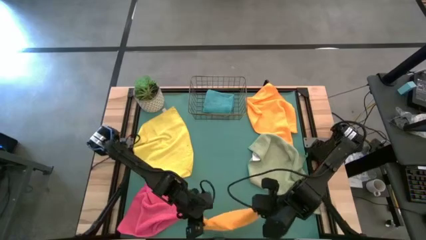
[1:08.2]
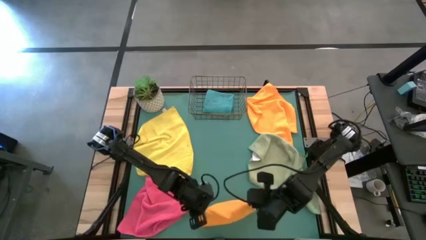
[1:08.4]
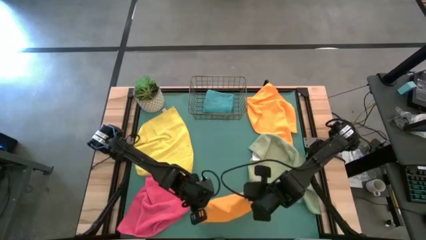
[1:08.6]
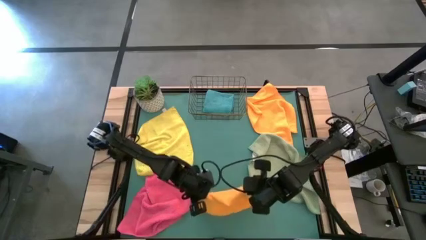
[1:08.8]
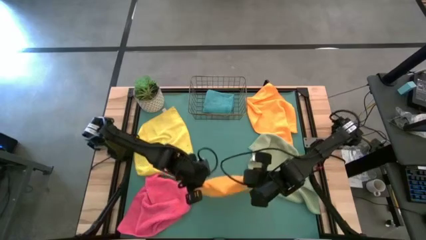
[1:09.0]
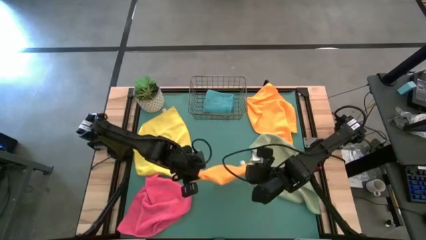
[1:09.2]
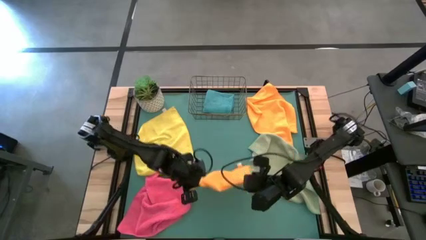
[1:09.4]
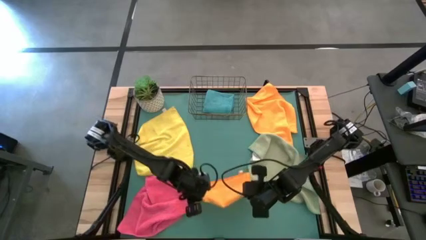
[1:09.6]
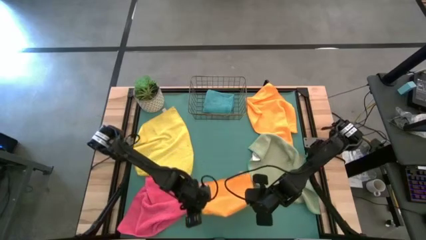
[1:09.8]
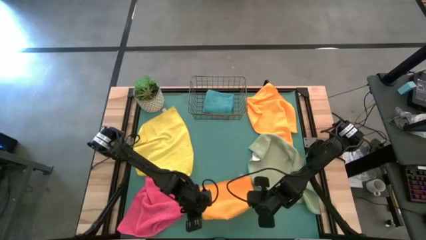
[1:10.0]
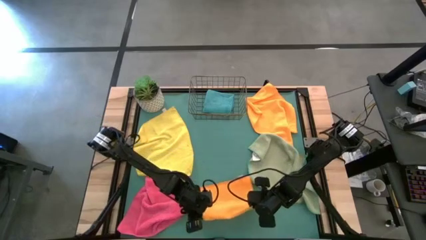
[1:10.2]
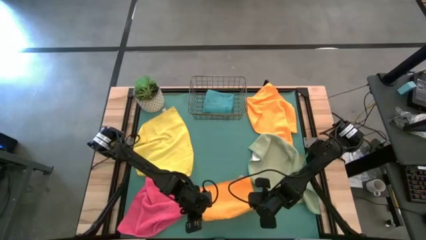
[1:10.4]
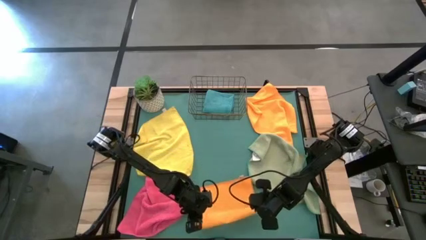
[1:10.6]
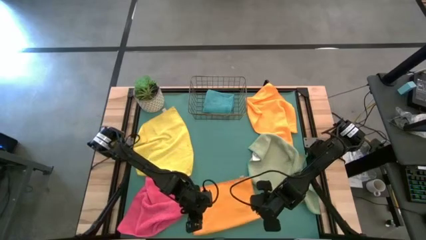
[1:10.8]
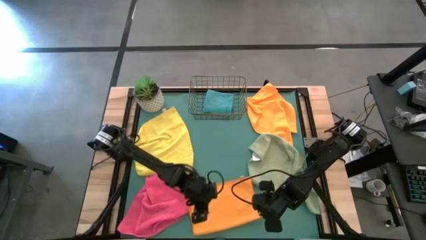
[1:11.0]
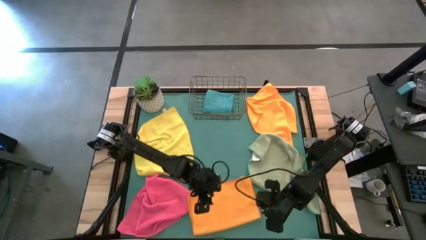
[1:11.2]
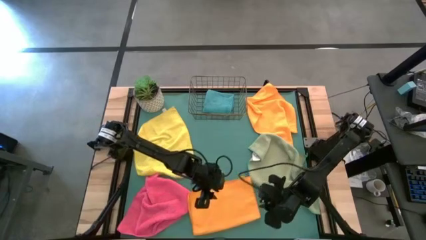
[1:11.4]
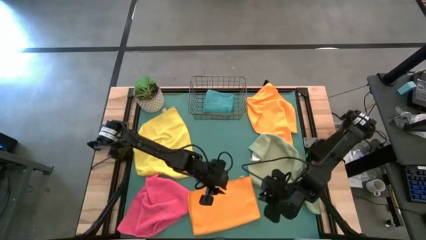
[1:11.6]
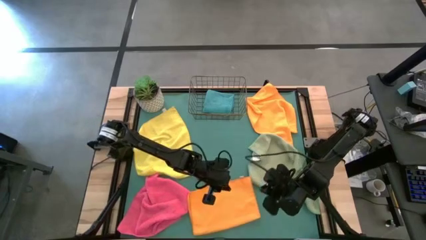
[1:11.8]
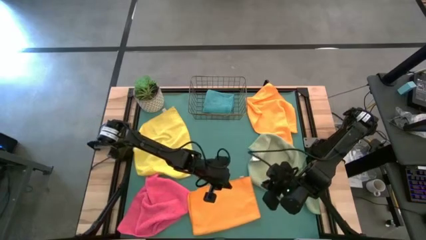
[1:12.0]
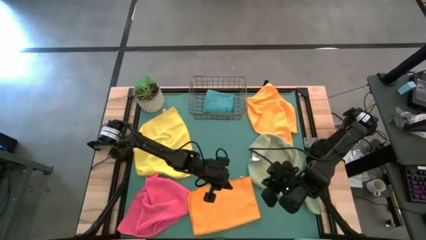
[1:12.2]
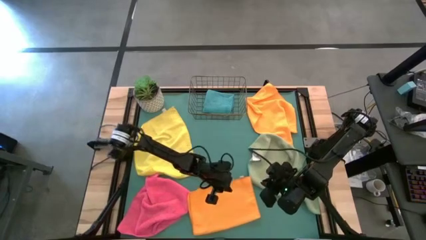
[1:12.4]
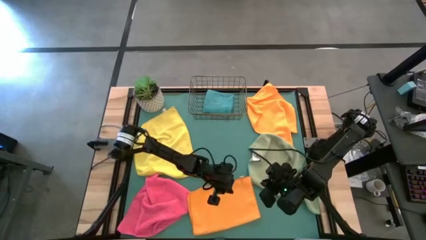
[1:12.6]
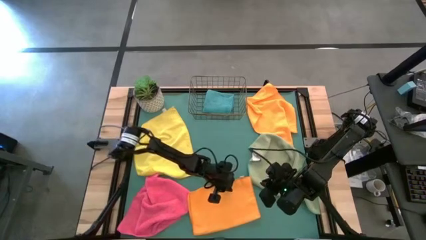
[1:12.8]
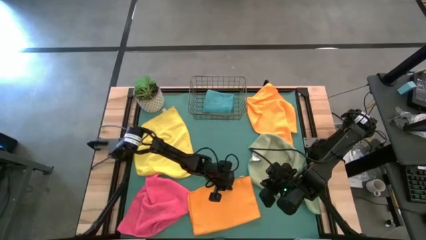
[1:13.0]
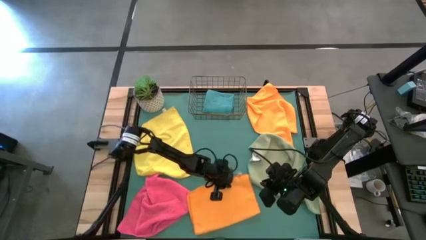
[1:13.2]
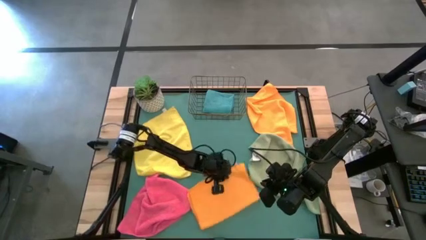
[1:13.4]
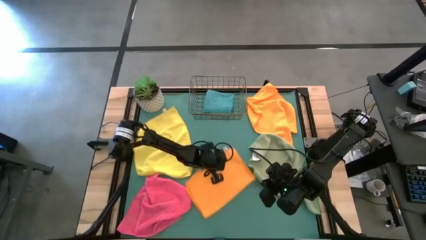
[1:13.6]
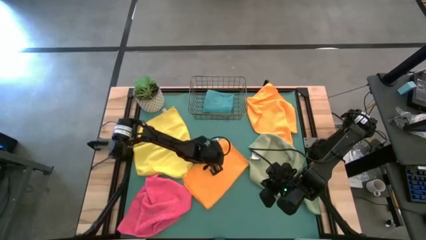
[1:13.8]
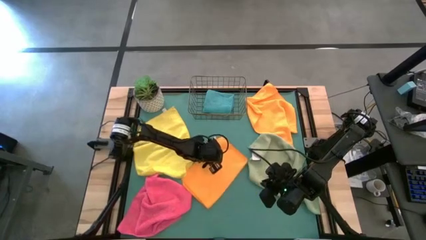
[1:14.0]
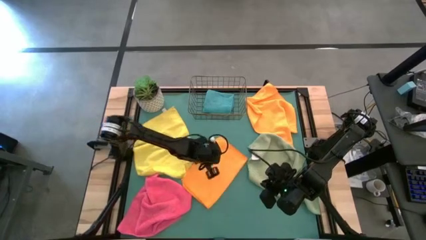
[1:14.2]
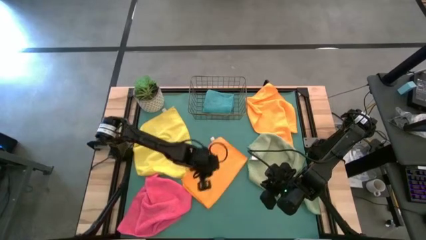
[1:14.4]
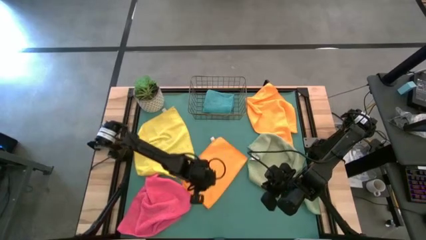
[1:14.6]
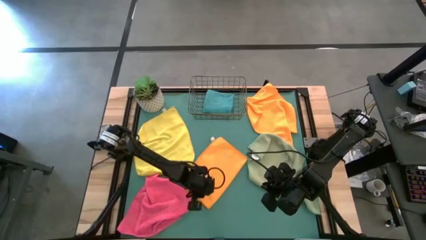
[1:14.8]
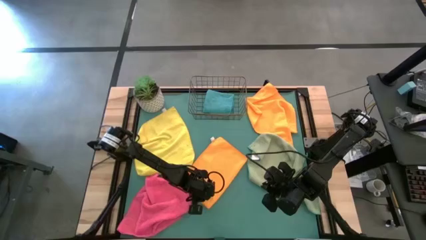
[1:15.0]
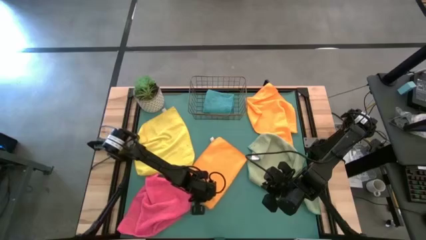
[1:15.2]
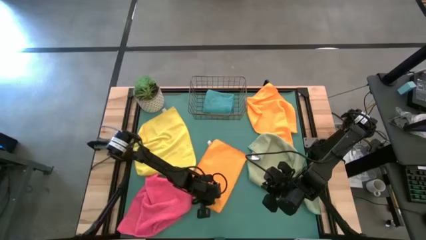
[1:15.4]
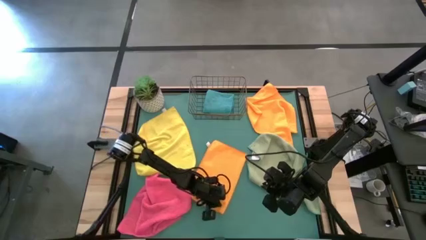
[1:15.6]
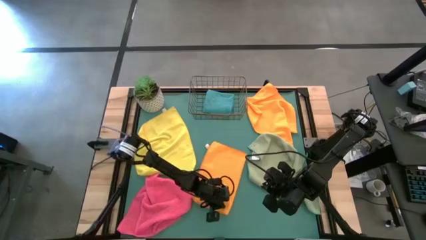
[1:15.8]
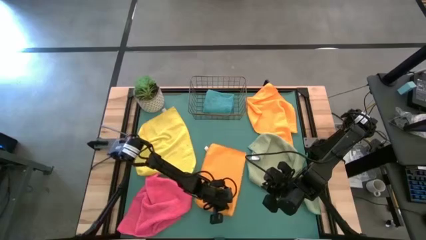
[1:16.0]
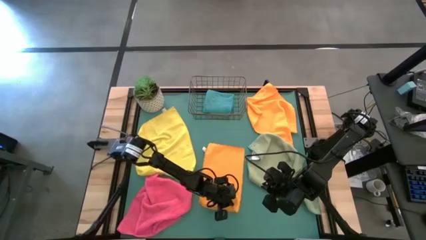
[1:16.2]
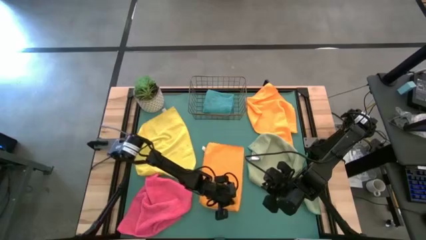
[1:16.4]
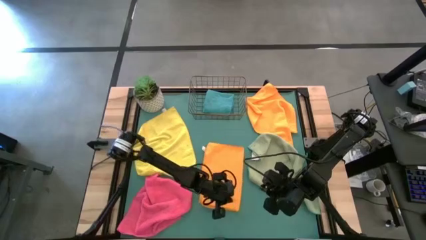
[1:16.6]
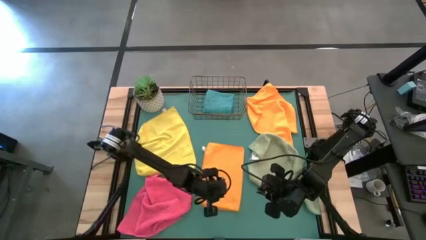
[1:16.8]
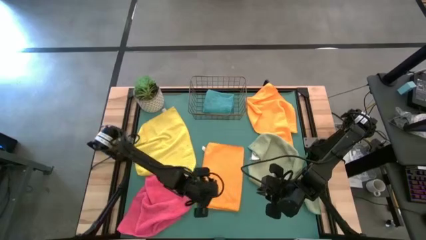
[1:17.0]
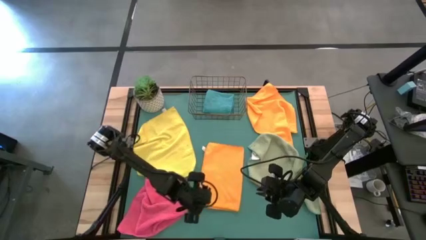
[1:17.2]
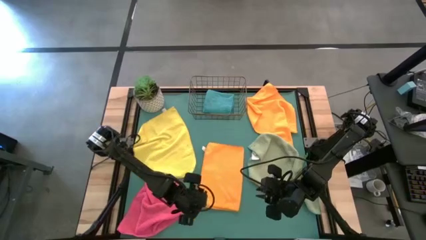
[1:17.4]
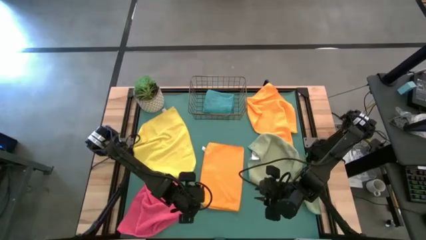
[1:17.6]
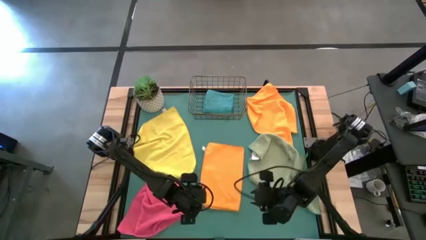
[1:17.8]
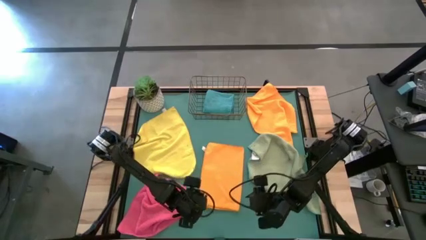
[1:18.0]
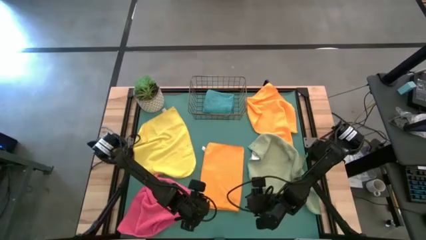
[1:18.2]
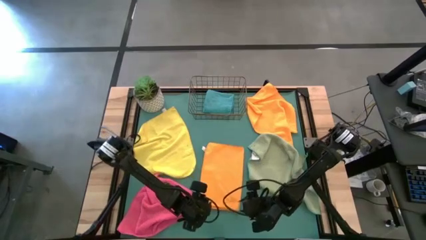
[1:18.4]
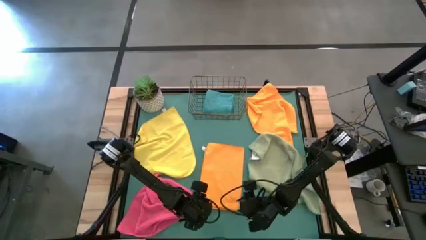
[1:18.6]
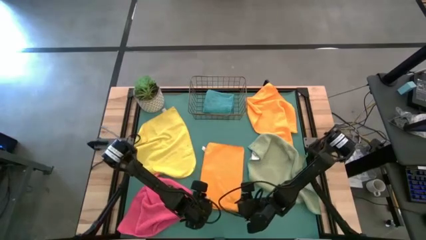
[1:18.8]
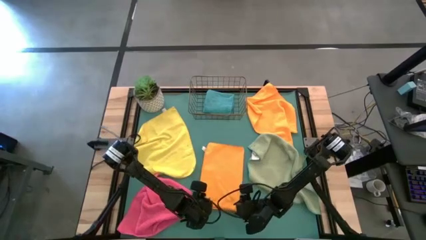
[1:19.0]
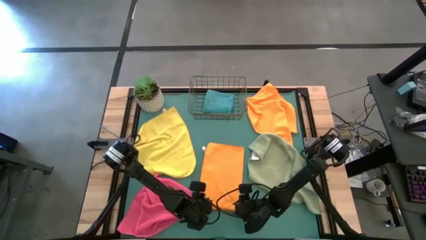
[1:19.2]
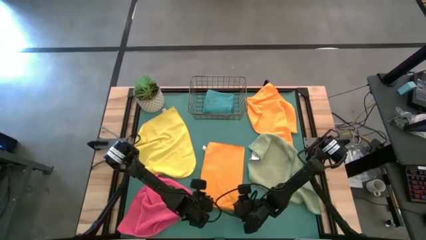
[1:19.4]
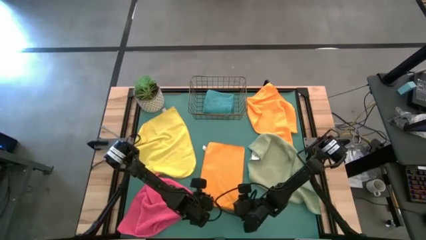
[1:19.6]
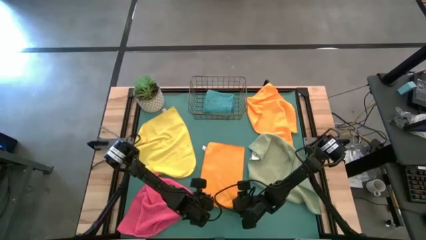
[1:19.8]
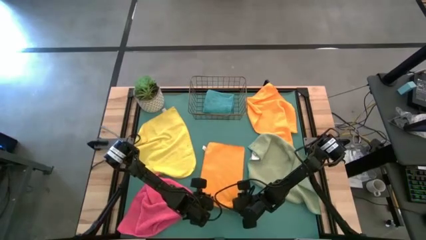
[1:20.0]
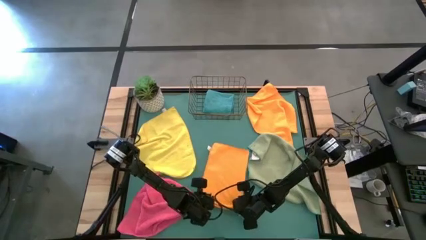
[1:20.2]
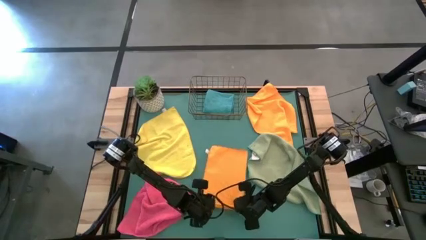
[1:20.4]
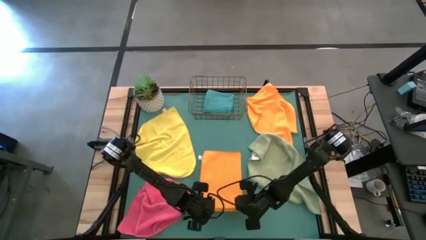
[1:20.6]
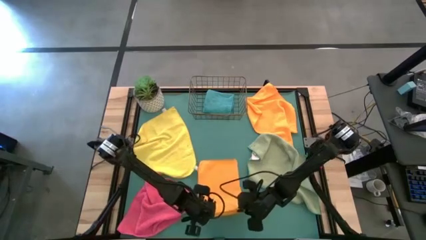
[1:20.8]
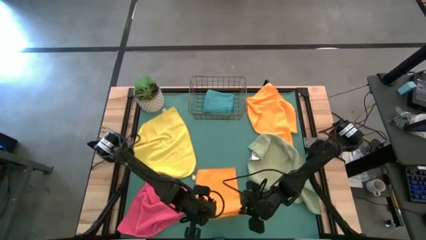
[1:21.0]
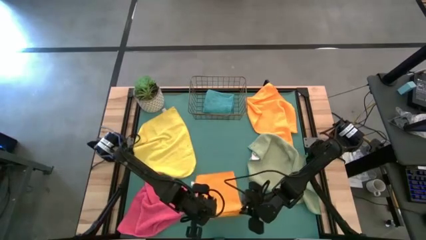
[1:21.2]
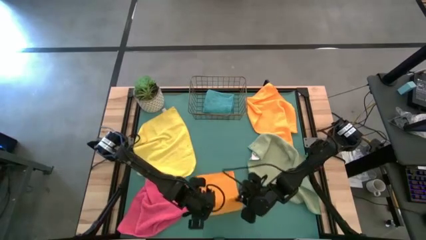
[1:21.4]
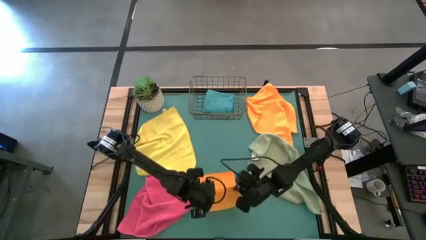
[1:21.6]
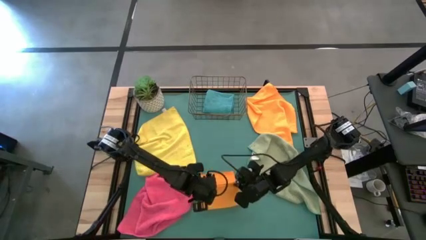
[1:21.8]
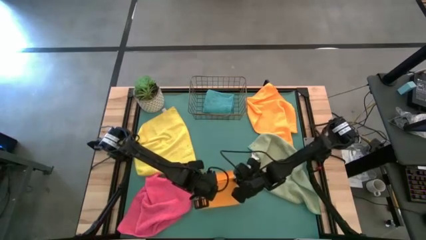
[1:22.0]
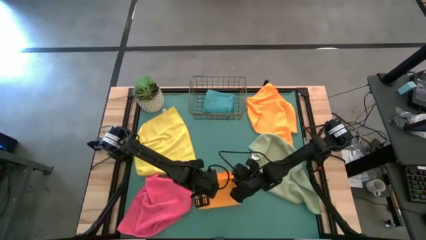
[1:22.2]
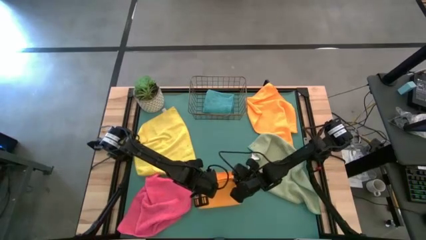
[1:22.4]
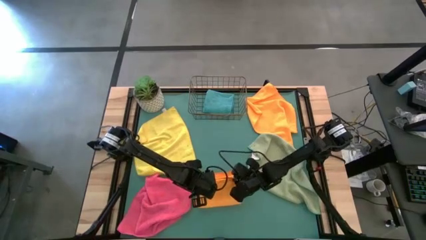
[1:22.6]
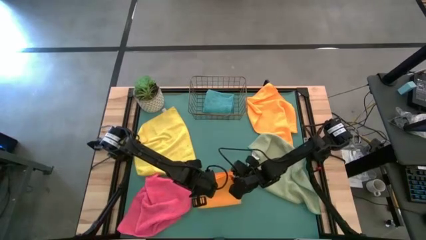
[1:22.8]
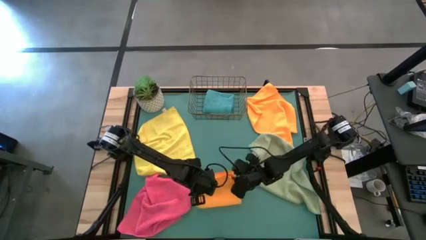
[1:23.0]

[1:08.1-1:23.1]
Task: Fold microfiber towels
Fold the left orange microfiber cloth
